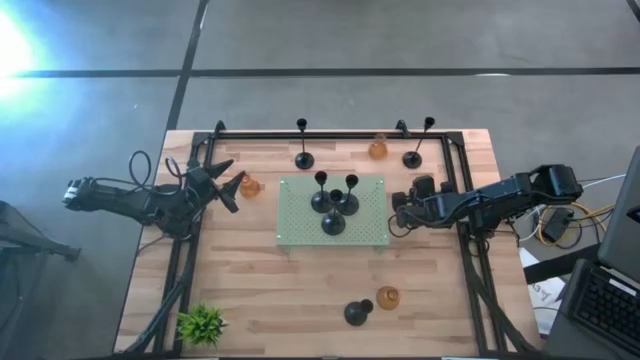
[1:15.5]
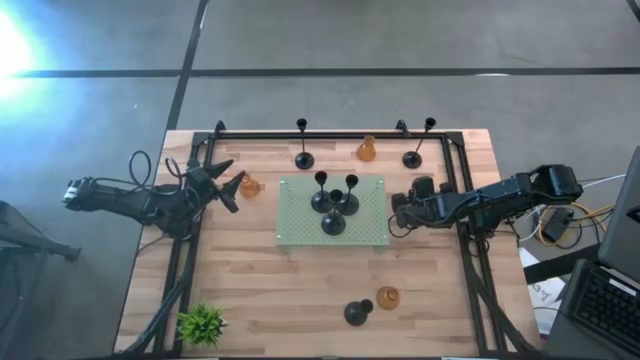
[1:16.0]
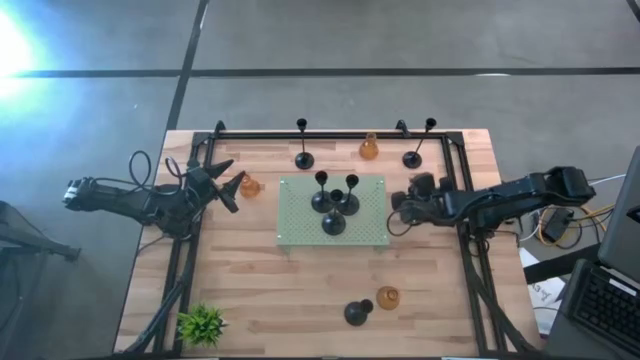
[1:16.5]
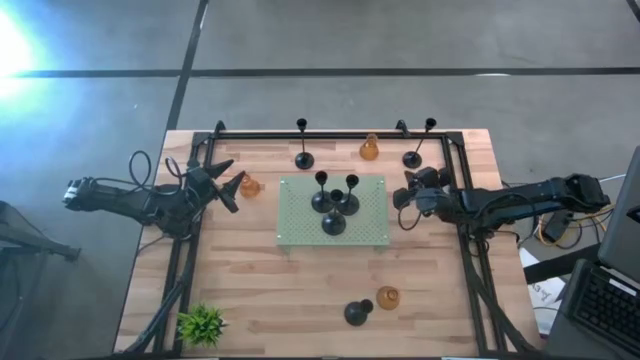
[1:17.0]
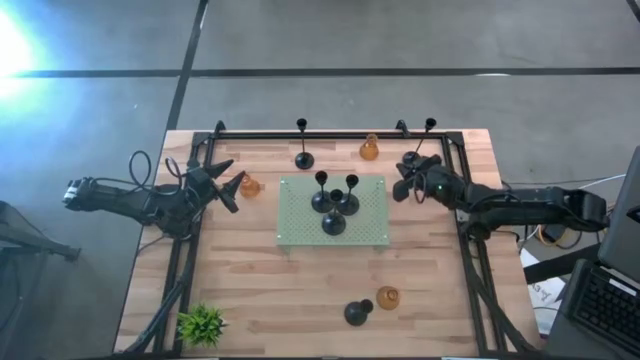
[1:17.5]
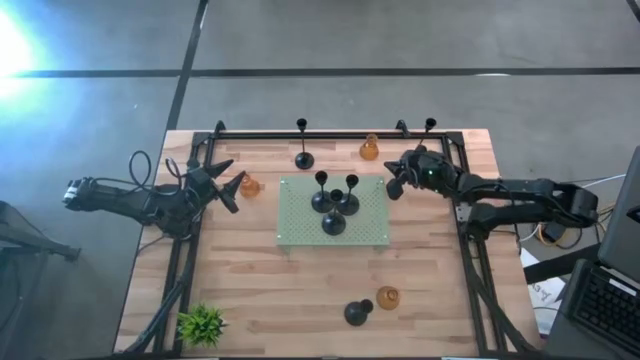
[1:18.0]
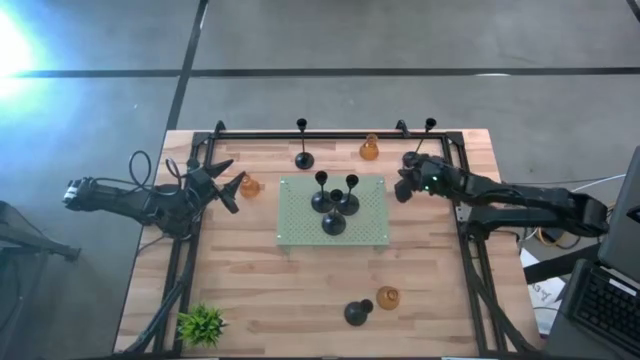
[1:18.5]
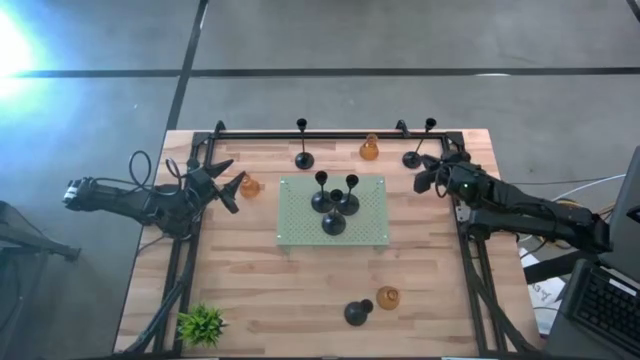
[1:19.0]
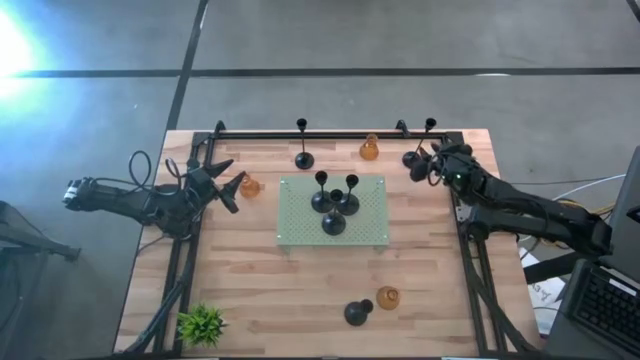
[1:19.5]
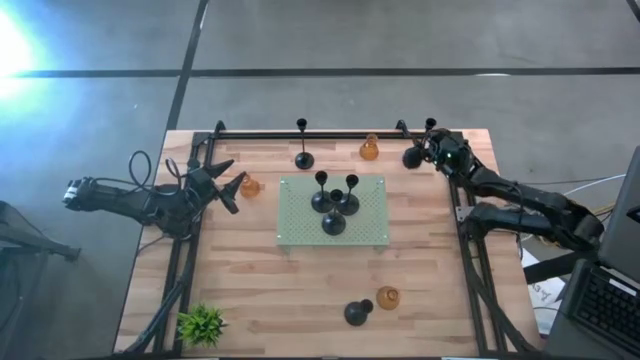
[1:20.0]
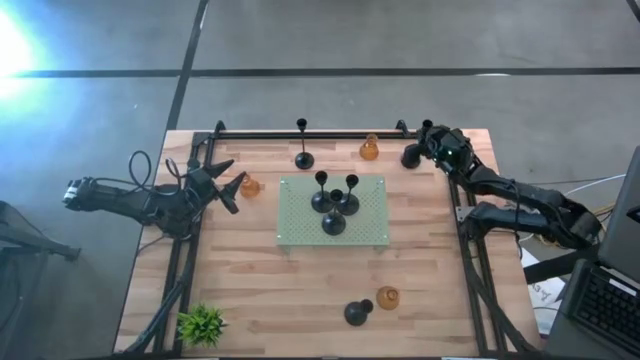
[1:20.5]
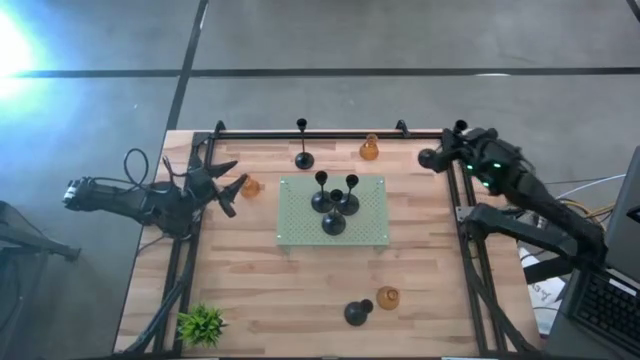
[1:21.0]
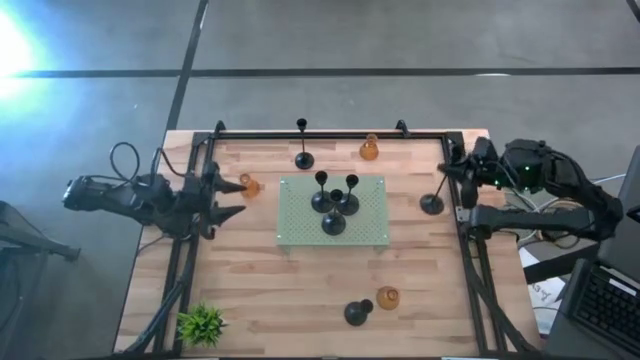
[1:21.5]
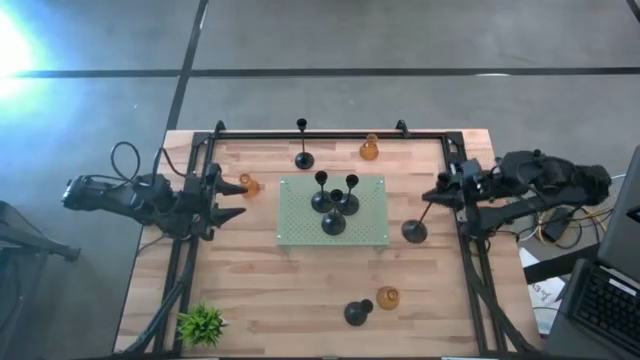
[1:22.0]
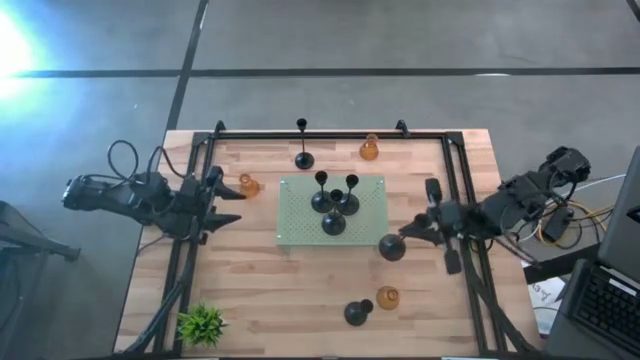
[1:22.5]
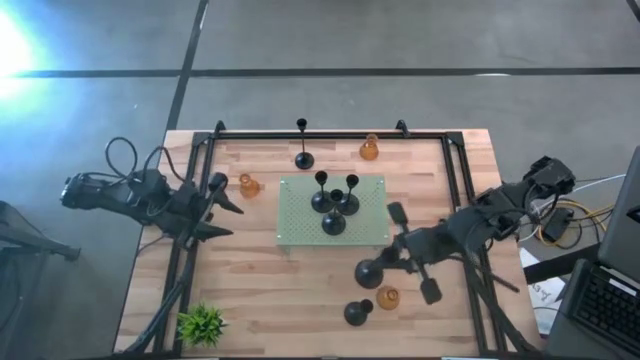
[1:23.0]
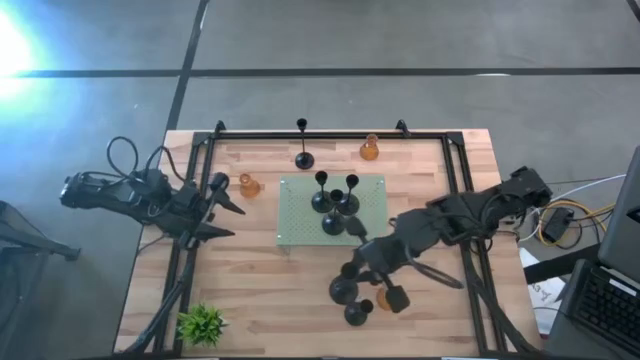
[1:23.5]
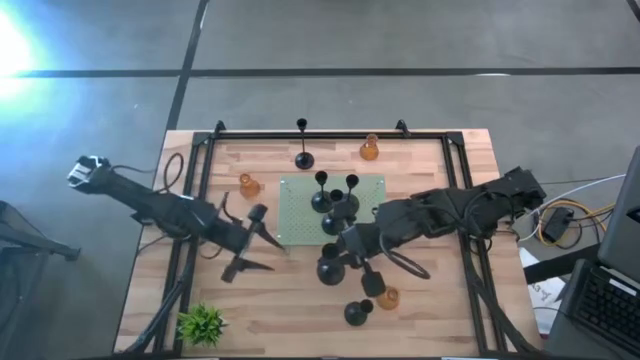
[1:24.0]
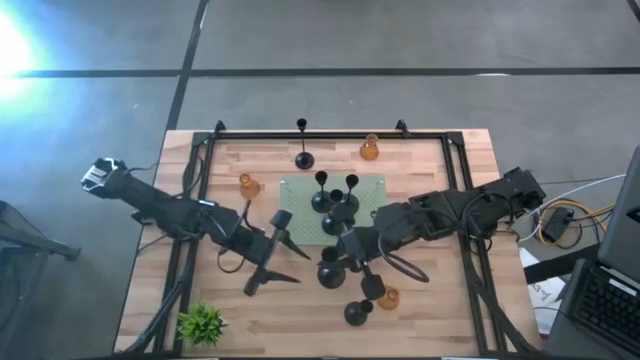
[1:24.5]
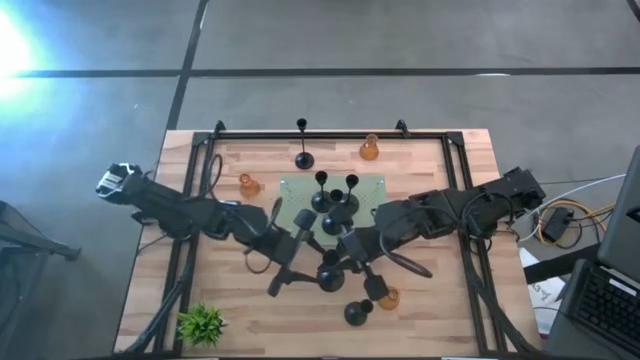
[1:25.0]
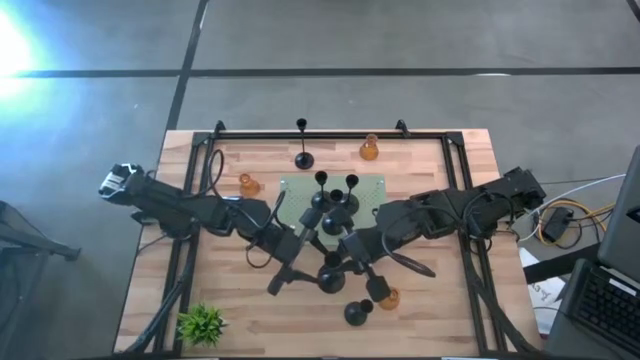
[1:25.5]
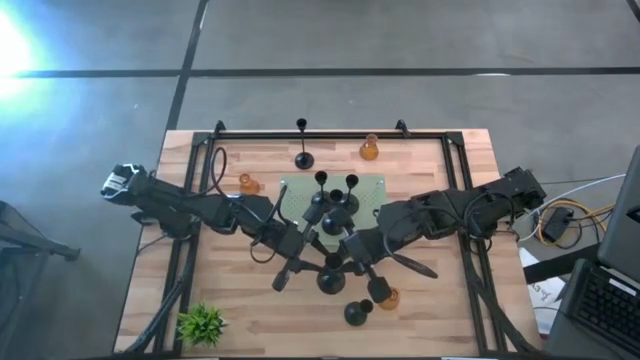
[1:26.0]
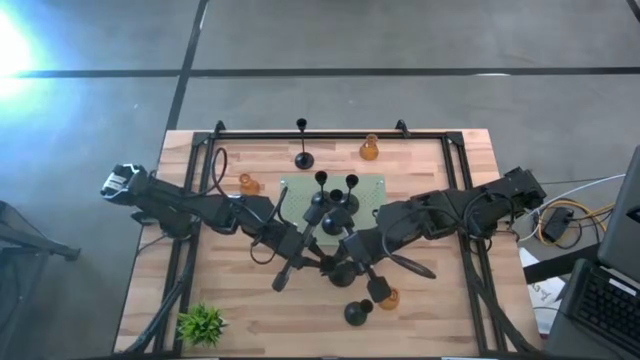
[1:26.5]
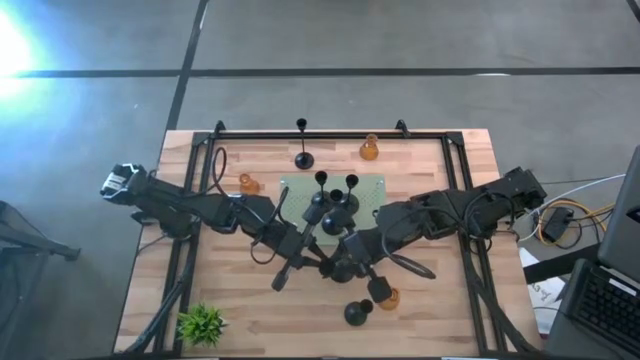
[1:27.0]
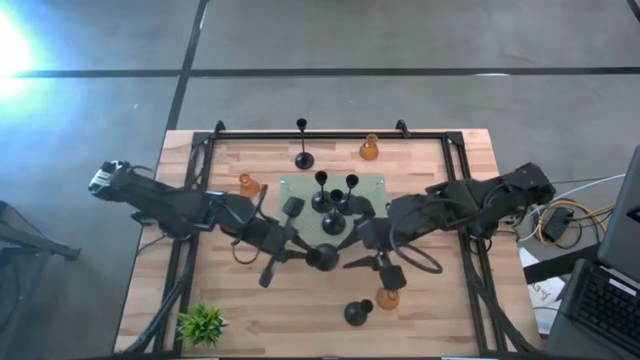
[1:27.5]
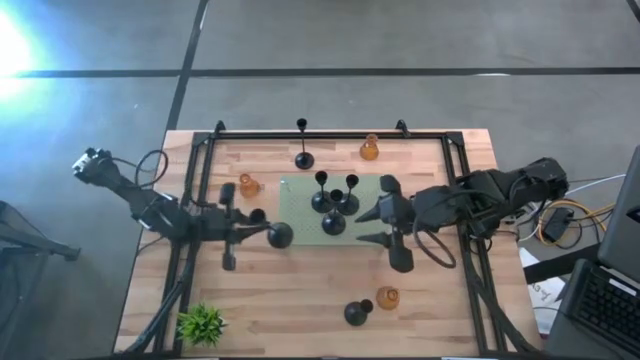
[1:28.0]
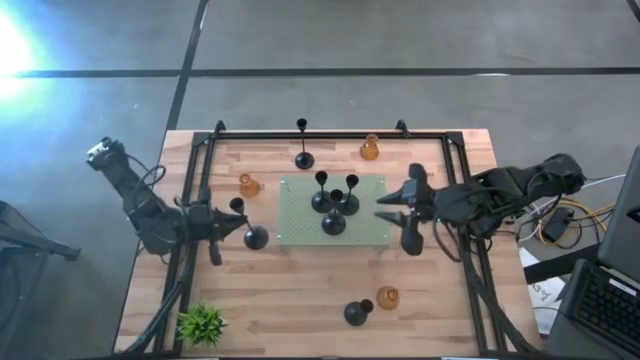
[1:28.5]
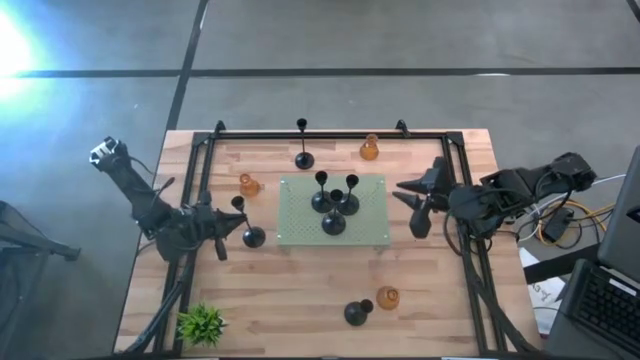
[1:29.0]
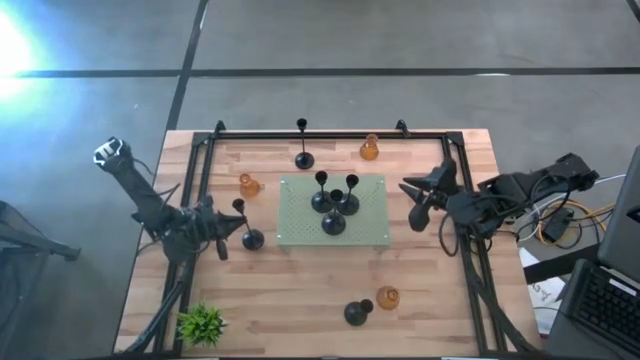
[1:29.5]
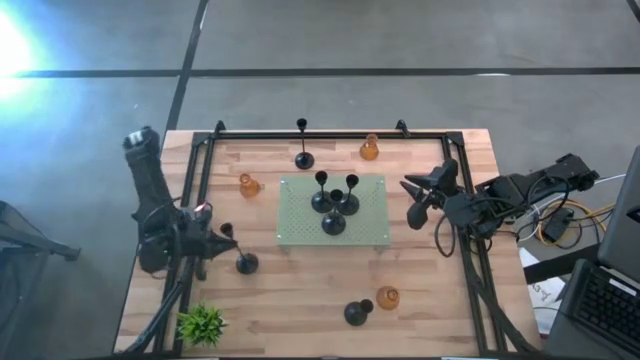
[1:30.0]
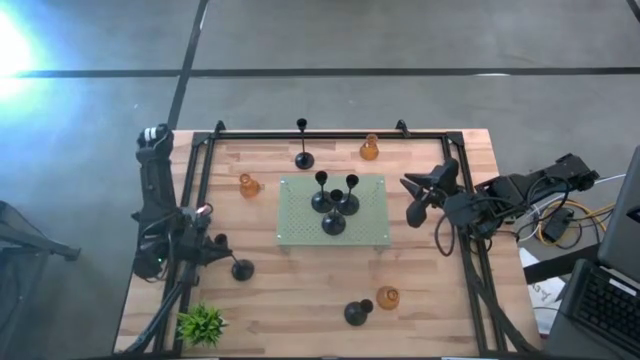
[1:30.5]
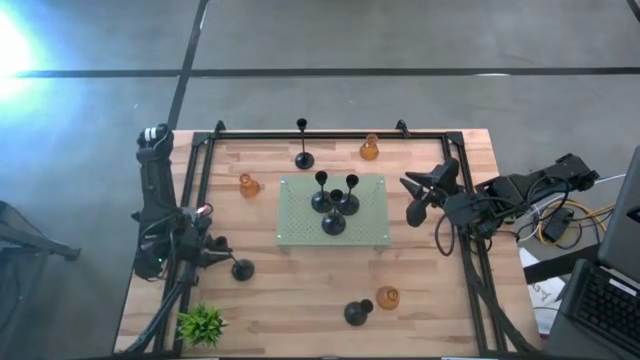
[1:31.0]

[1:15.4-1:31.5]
Task: Pick & Place candle stick holders
Move the black candle holder to the left of the table

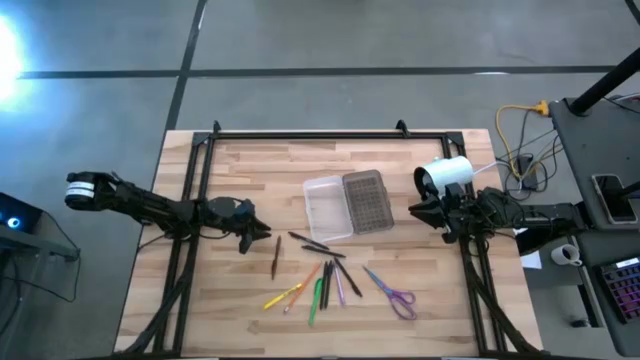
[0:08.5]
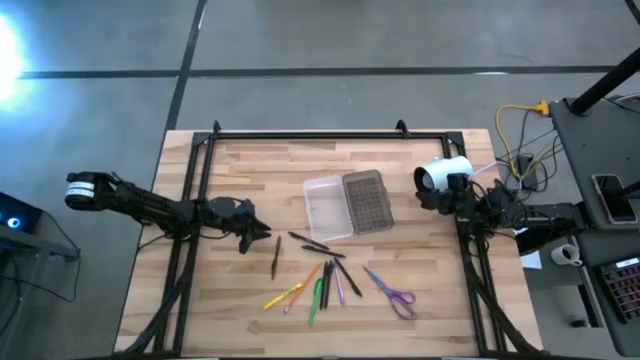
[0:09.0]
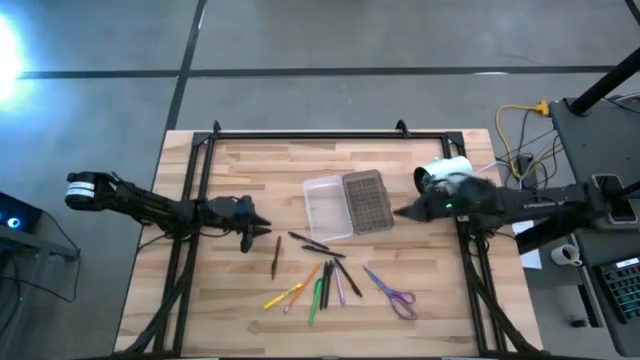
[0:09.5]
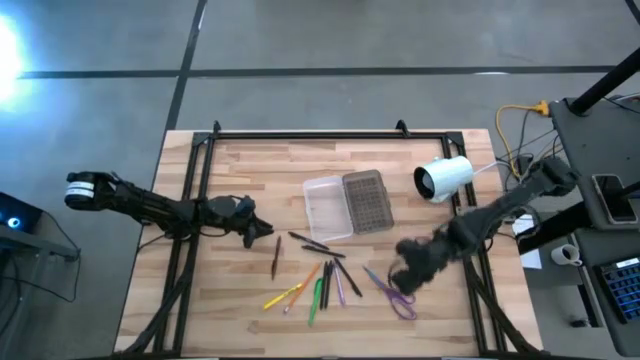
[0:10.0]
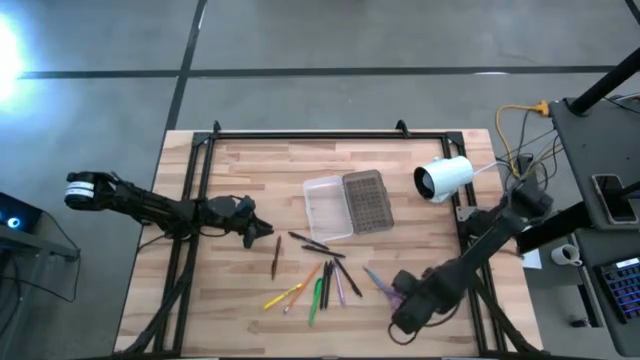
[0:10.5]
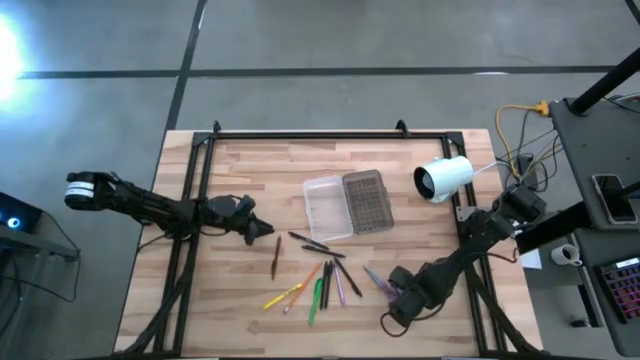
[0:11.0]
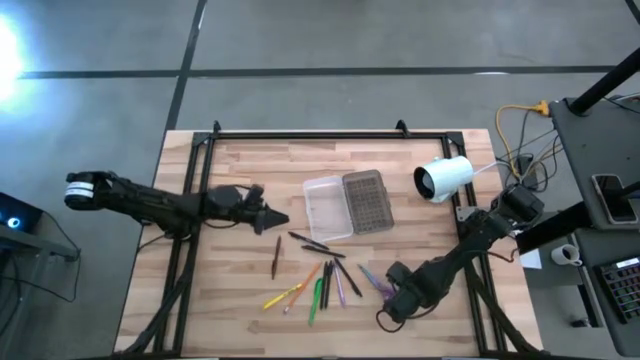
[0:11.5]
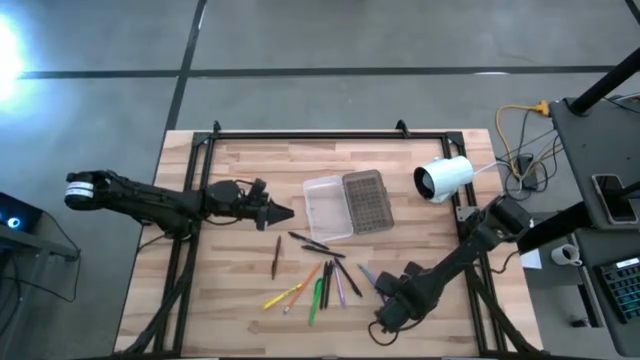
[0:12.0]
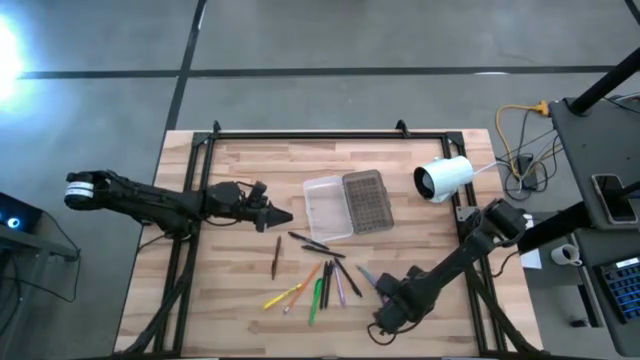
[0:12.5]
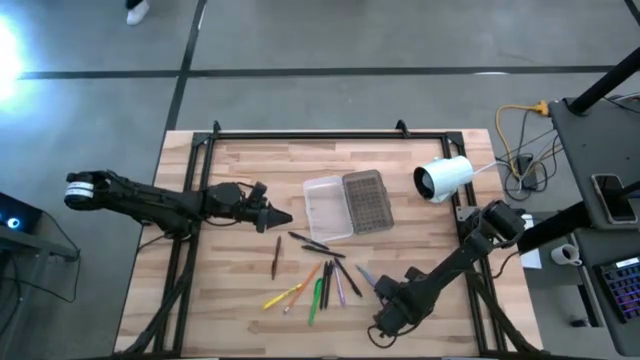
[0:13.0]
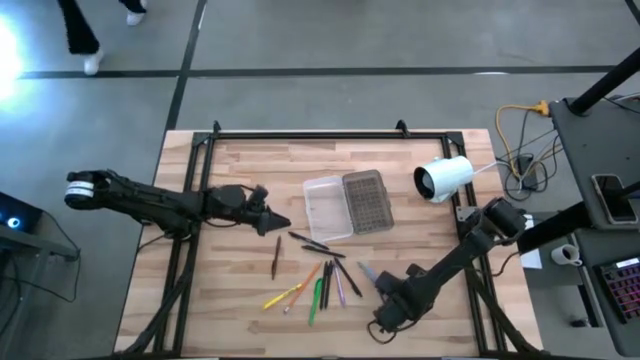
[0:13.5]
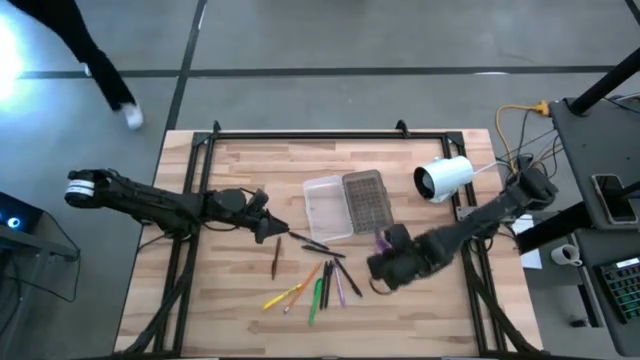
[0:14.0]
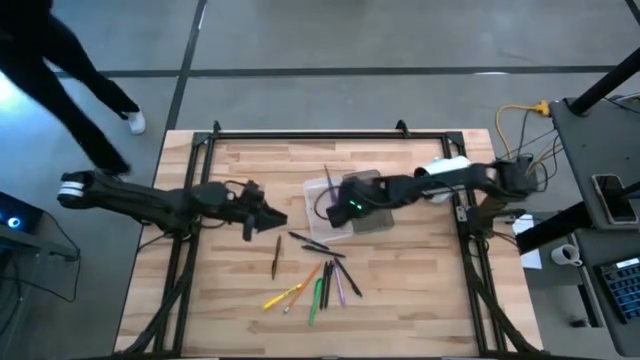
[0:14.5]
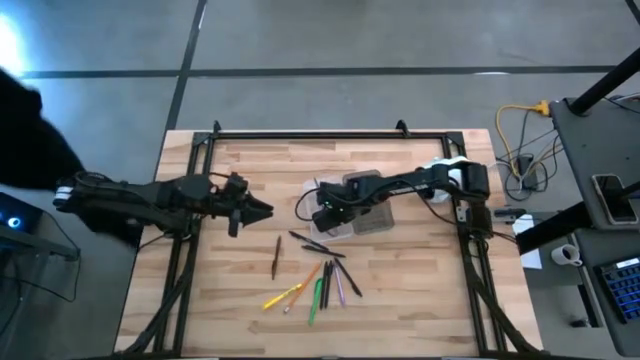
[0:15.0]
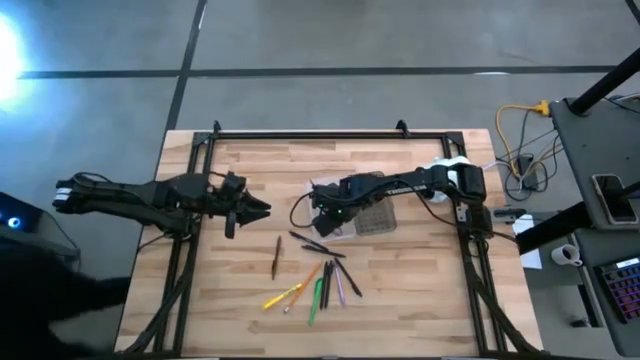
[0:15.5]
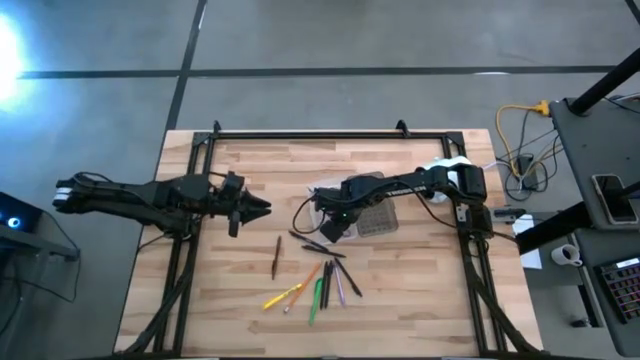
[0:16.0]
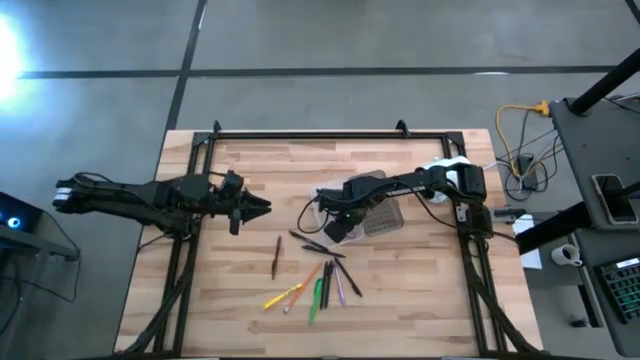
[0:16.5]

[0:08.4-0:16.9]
Task: Pick & place school supplies into a supply box
Put the purple scissors into the supply box
